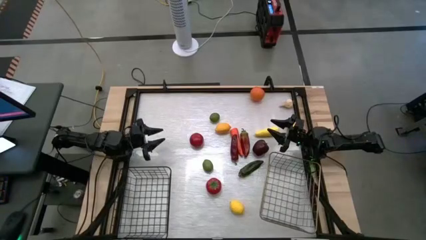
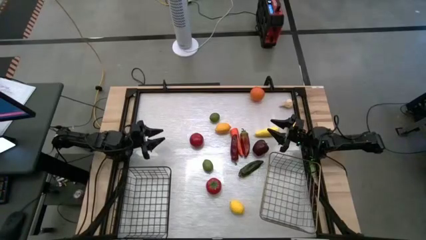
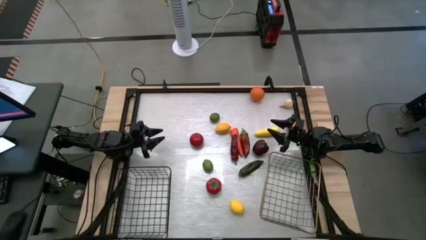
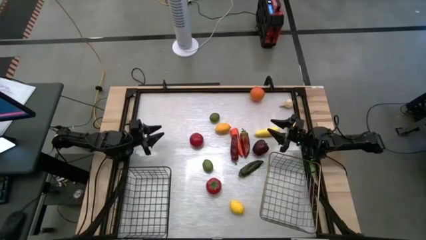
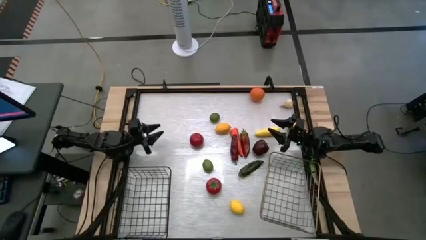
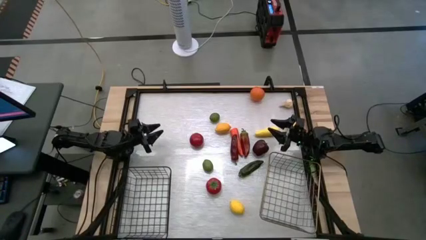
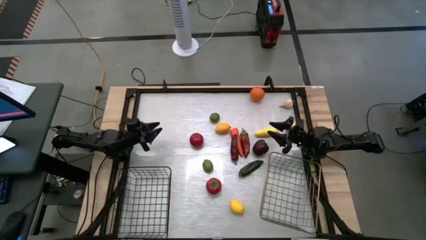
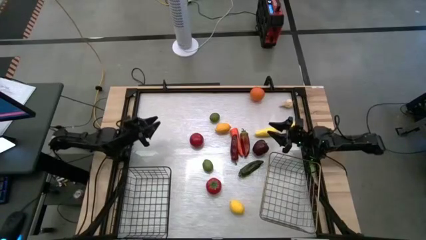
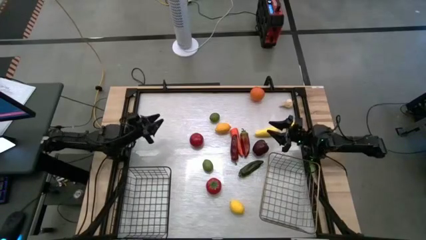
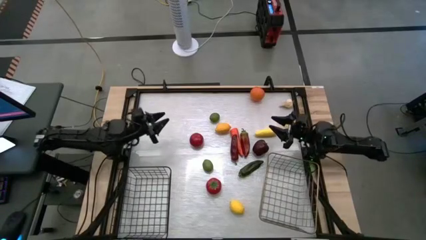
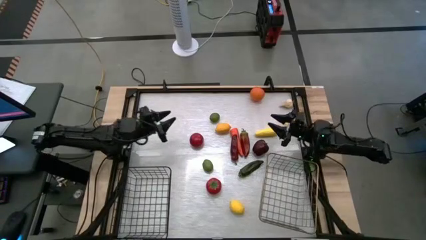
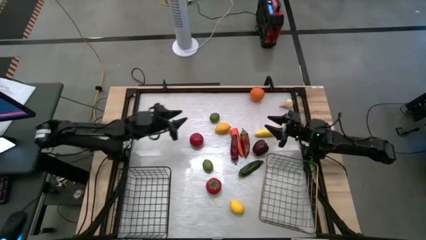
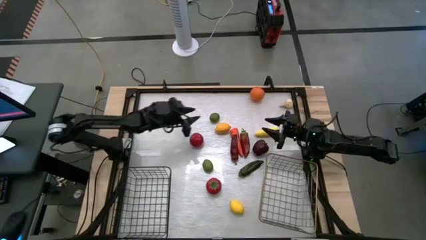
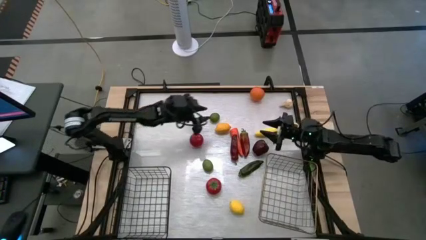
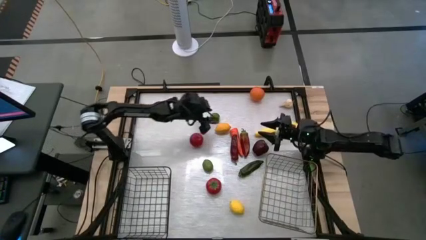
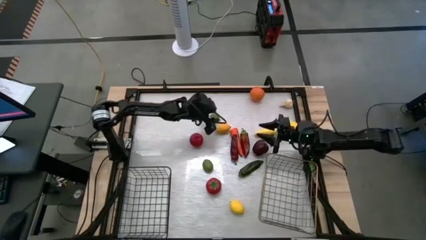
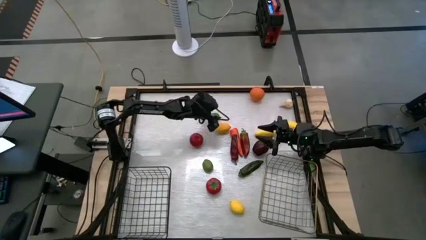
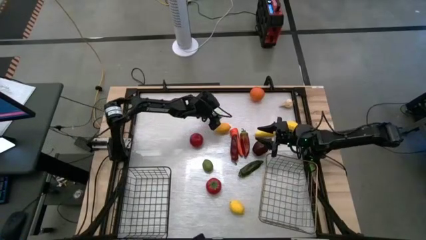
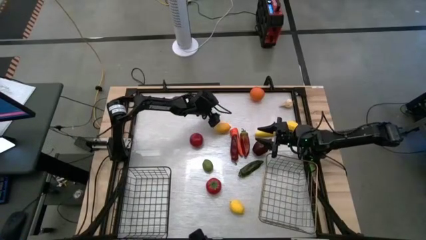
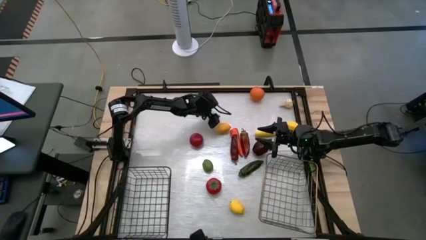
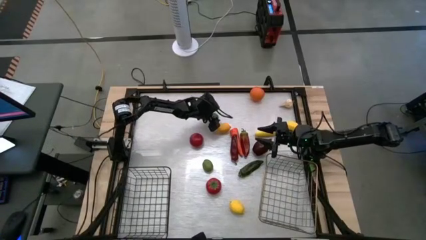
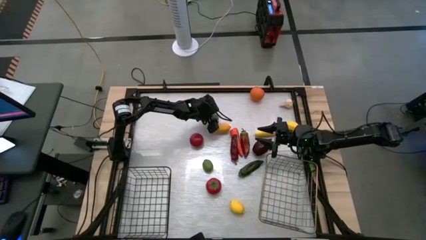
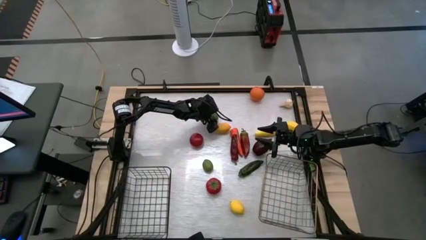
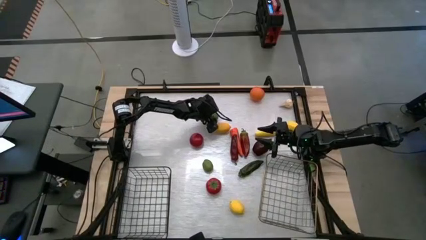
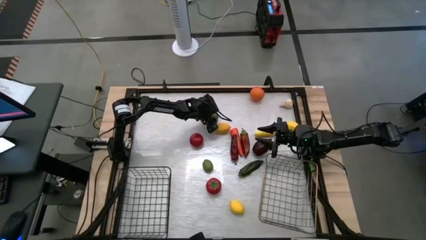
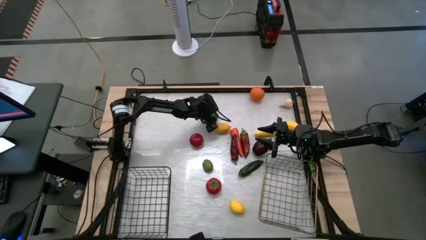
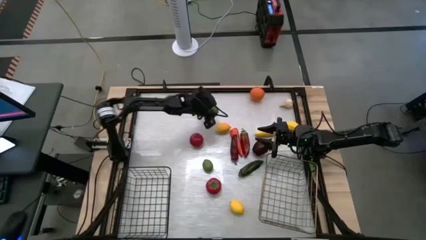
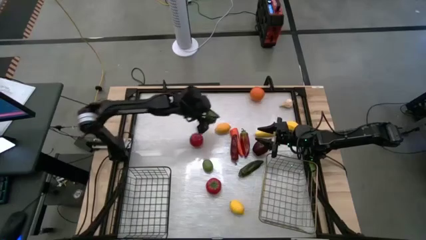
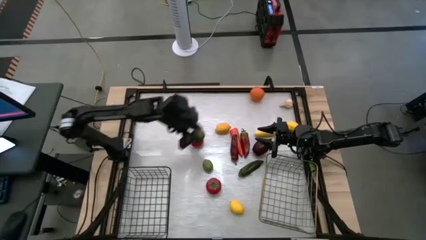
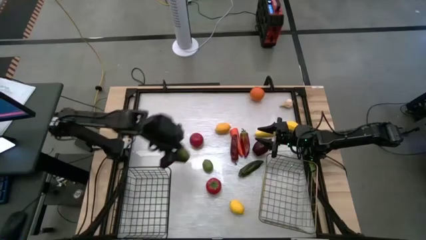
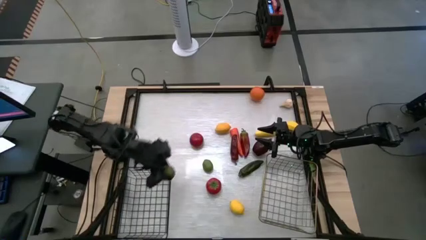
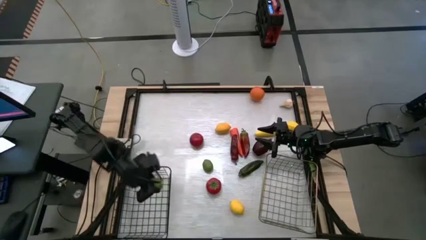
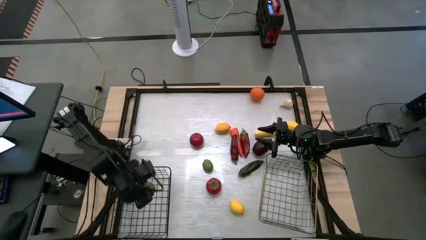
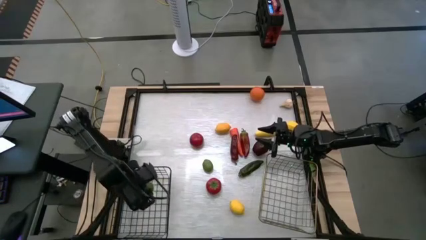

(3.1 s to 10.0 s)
Task: Sort produce into baskets
Put the top green lime into the black wire basket

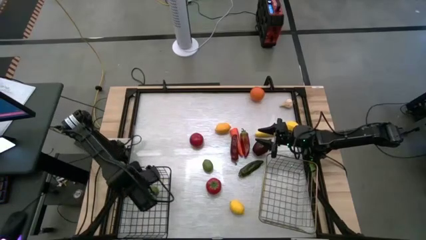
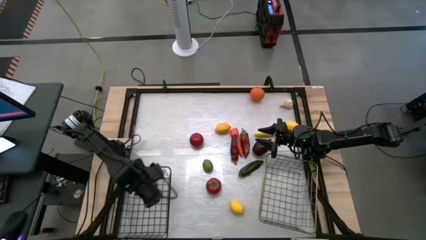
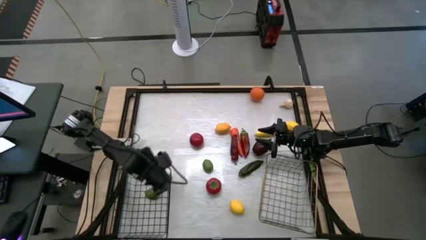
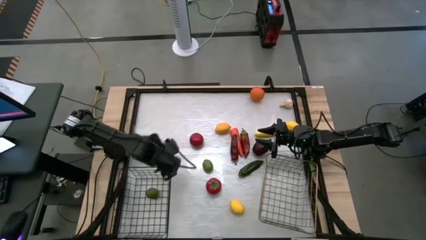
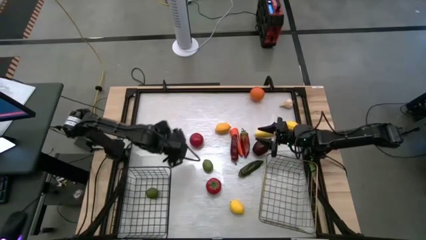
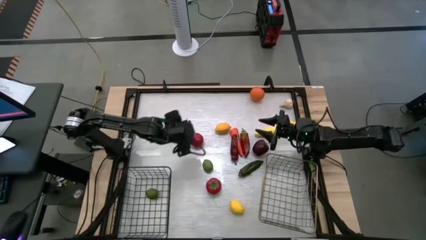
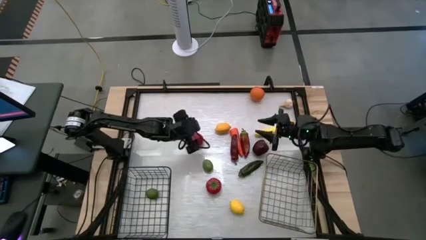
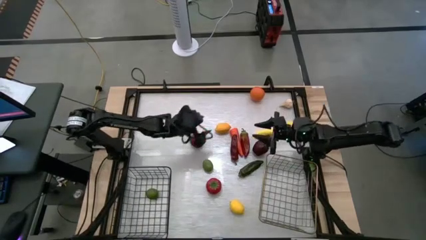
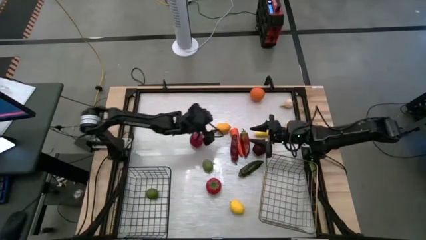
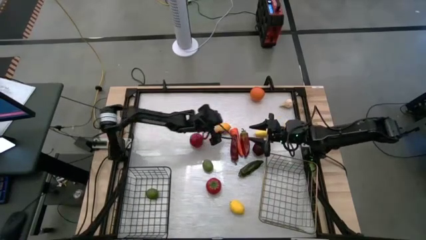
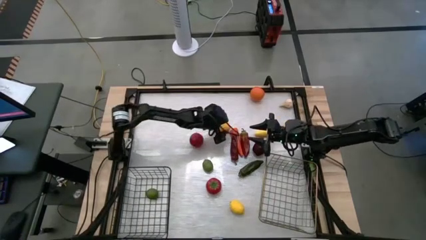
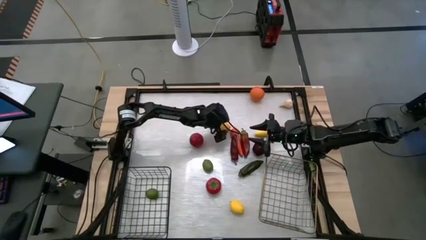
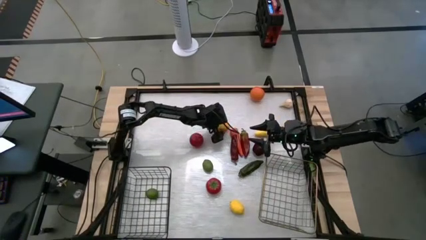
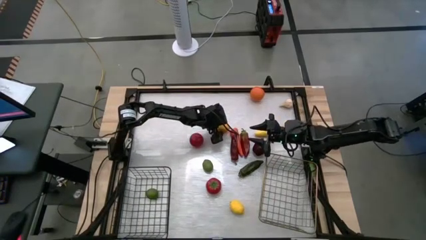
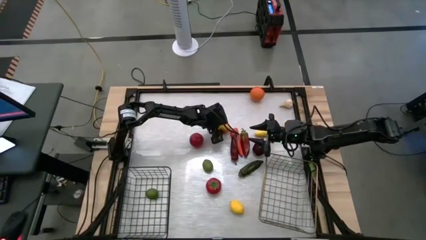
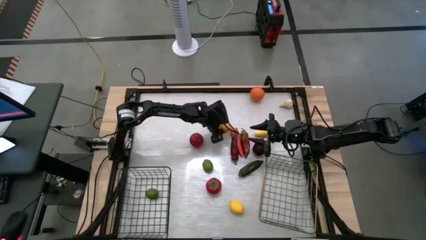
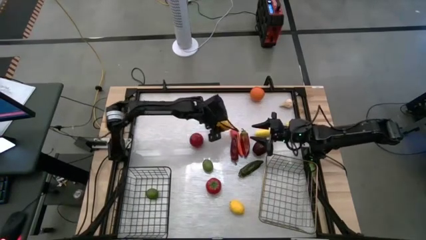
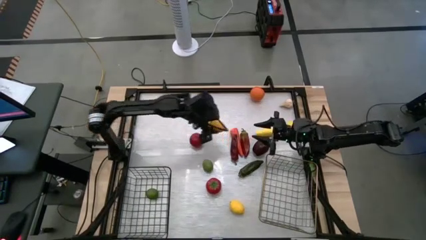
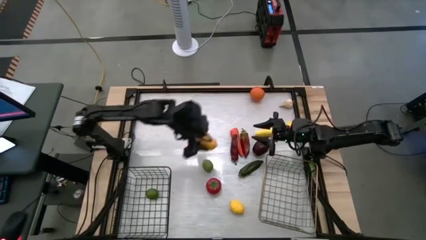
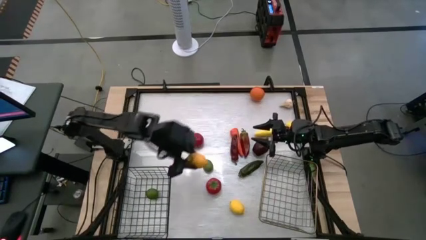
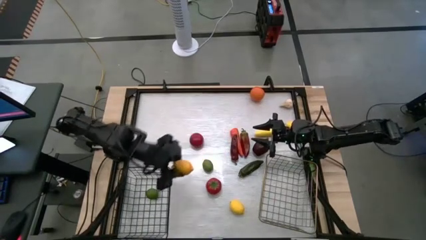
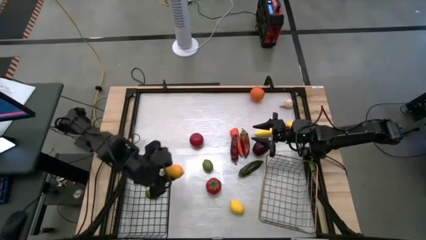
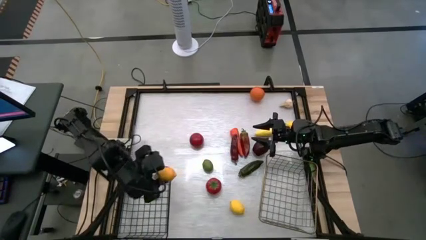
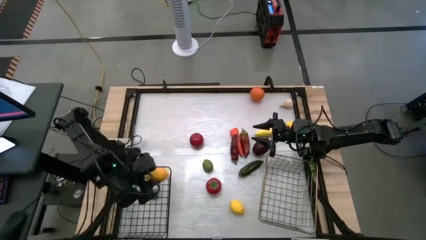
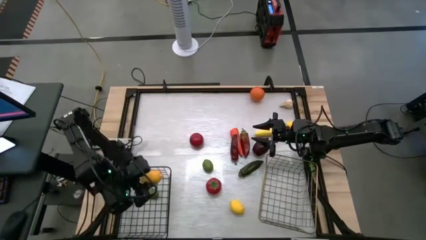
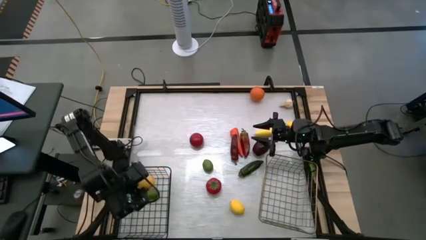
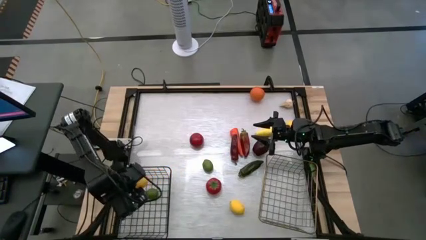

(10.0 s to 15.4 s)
Put the top left yellow lemon into the black wire basket

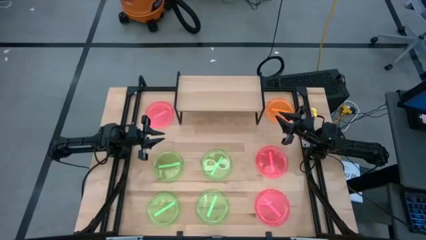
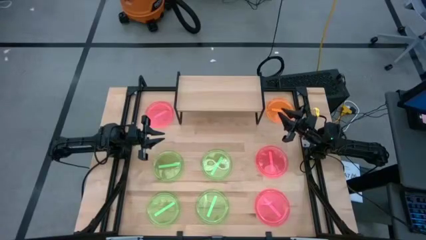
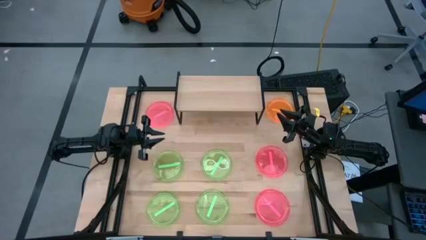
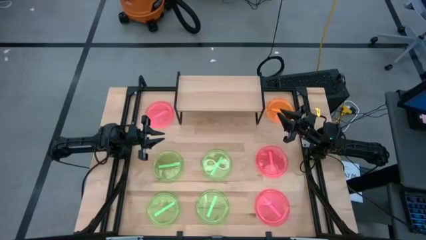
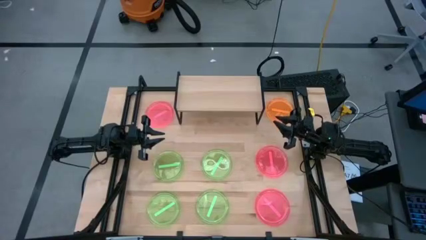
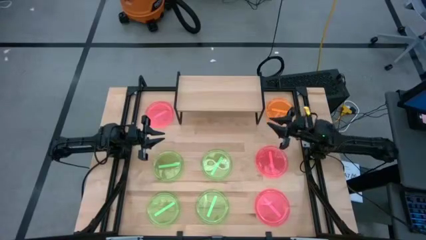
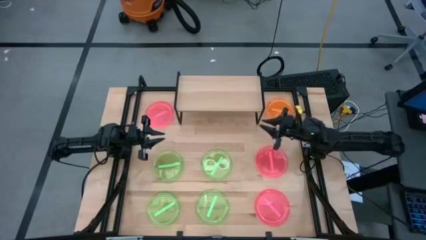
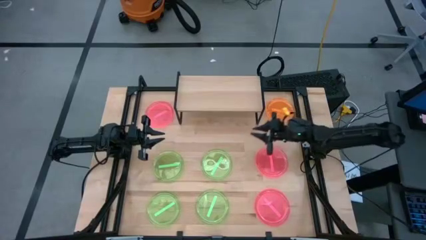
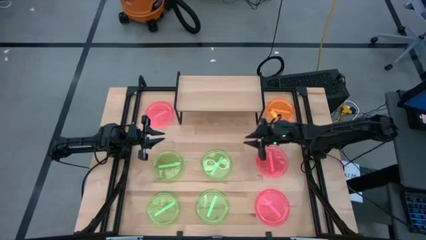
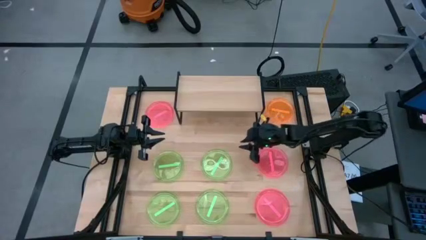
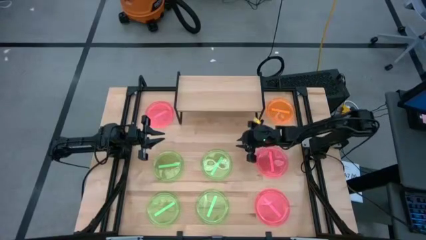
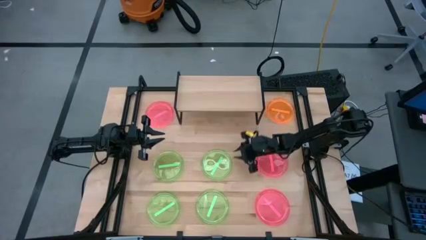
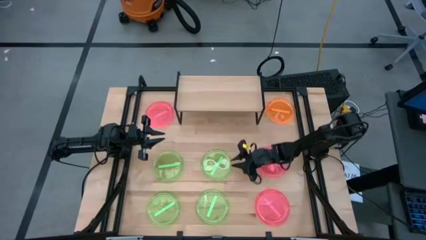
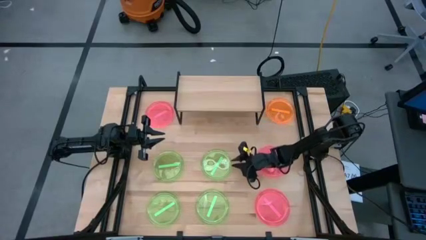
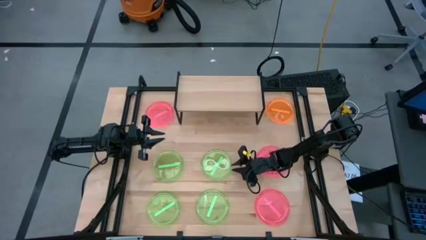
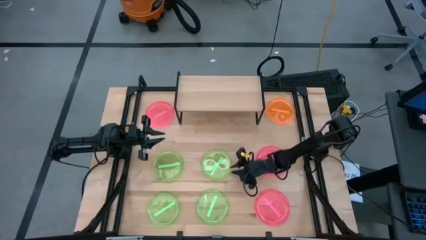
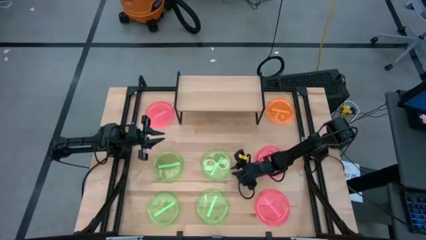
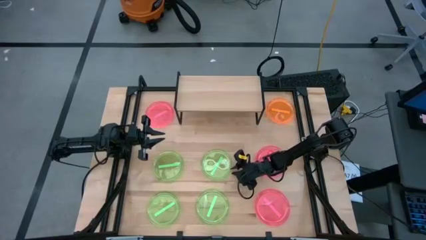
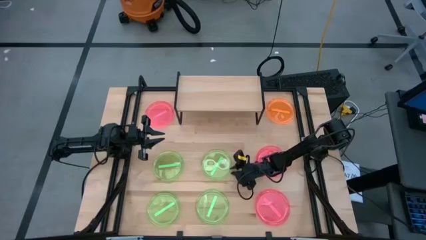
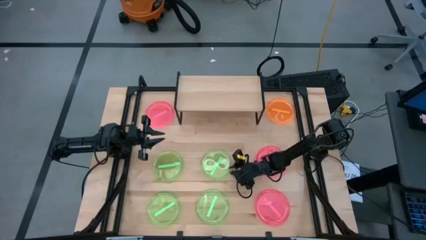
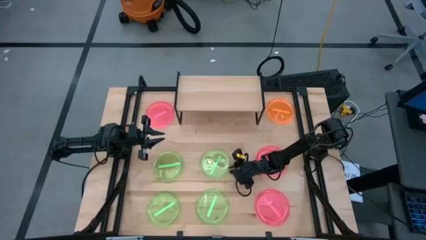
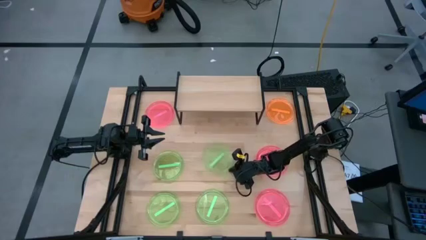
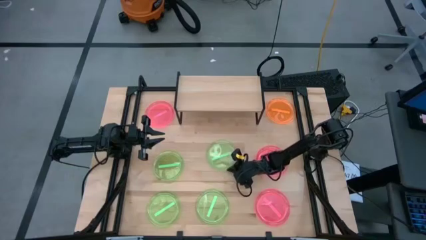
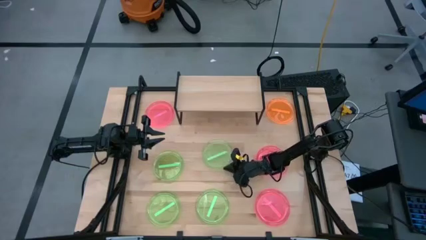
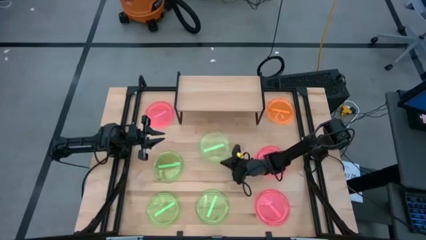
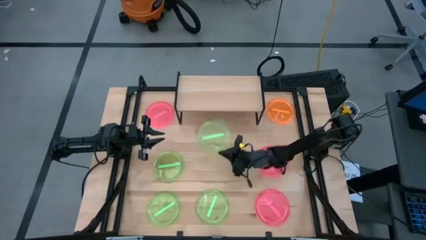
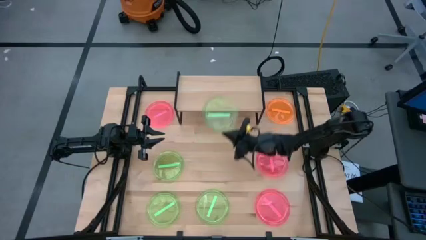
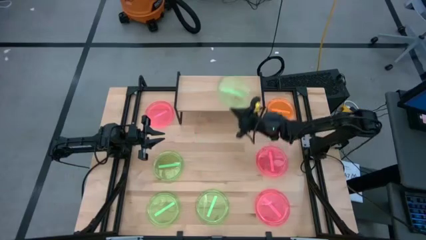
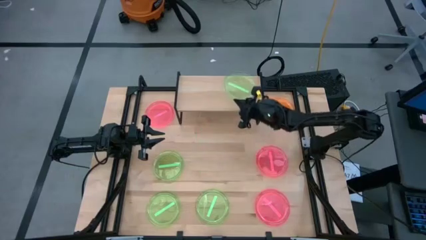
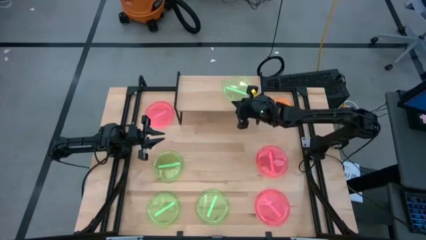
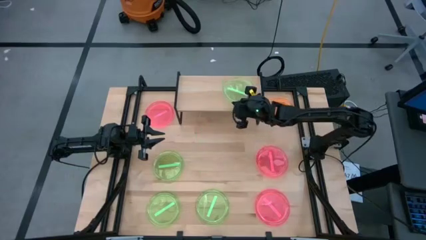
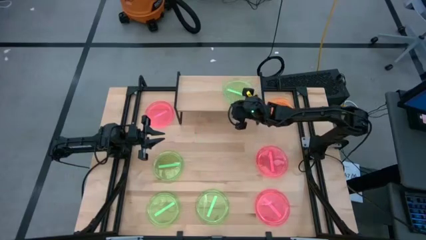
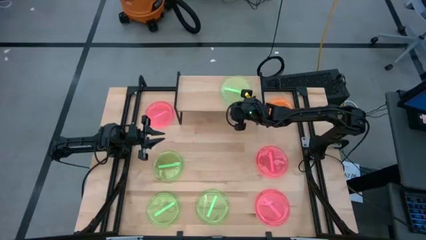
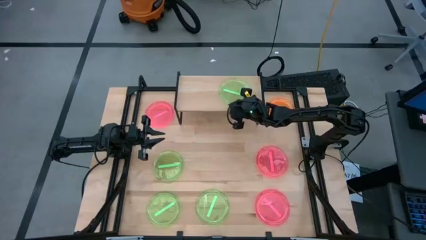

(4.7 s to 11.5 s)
Task: Place and stack plates onto a shelf
Put the green plate on the shelf
